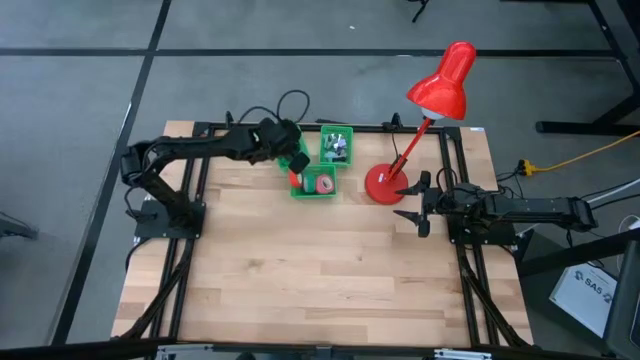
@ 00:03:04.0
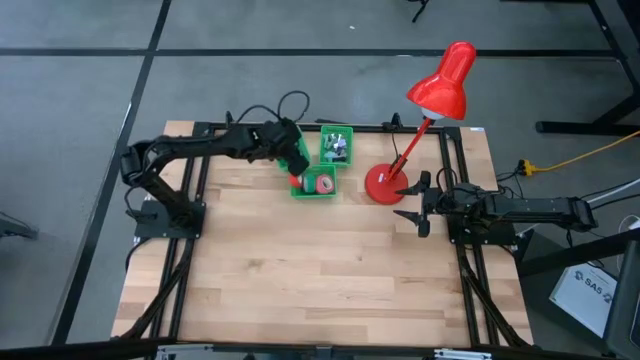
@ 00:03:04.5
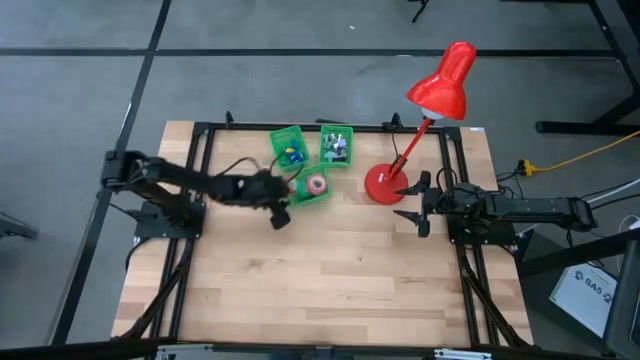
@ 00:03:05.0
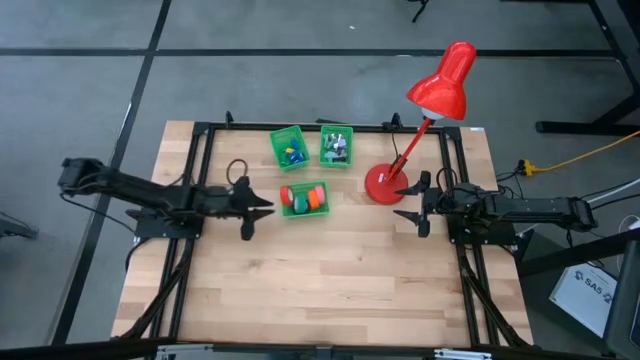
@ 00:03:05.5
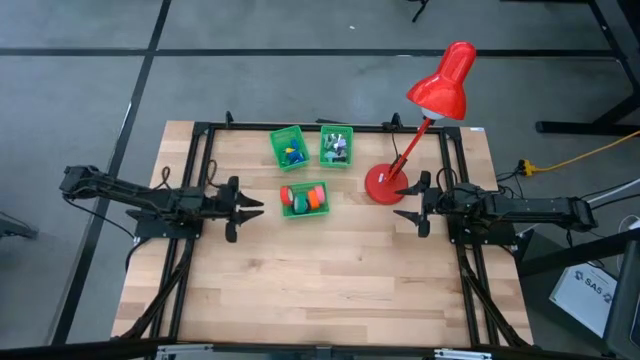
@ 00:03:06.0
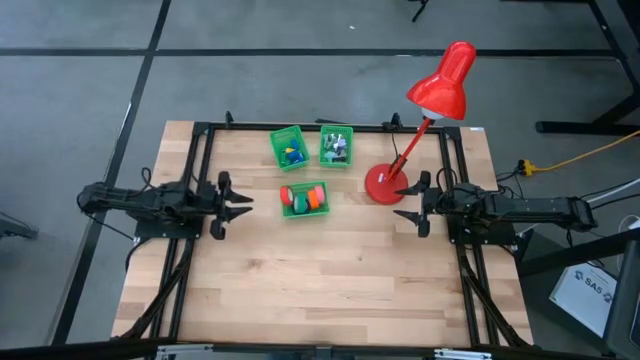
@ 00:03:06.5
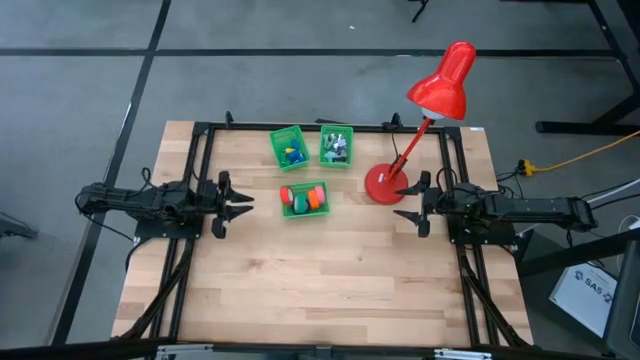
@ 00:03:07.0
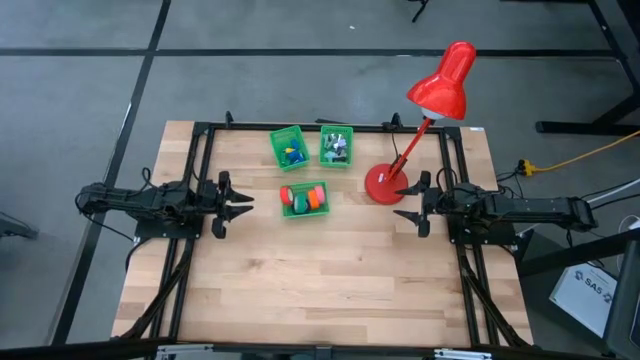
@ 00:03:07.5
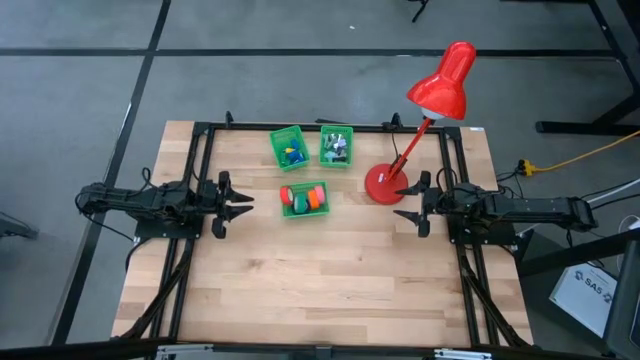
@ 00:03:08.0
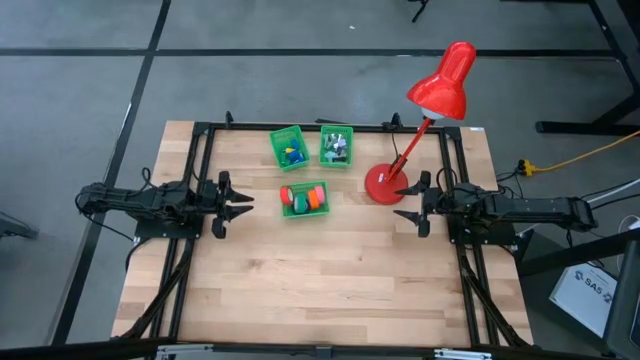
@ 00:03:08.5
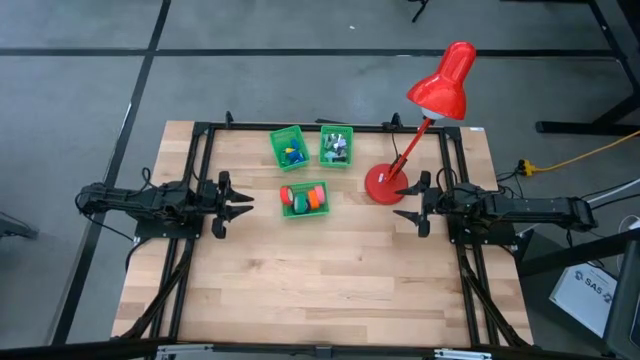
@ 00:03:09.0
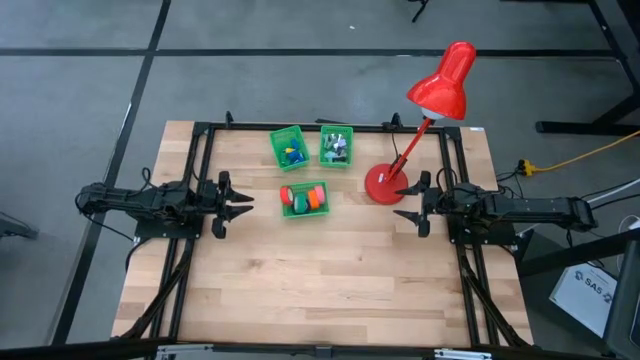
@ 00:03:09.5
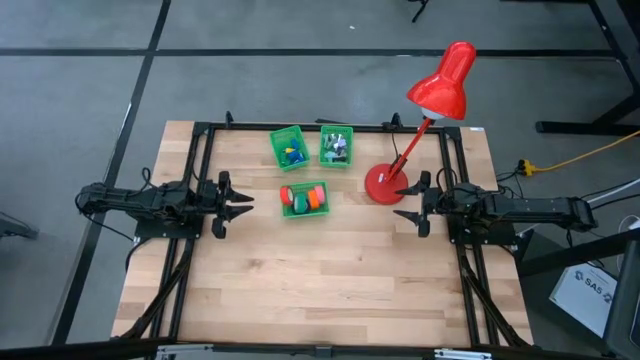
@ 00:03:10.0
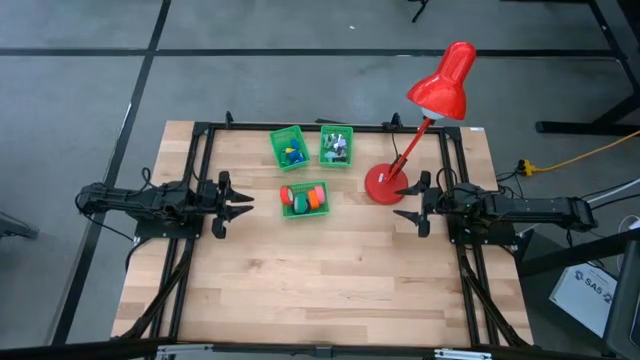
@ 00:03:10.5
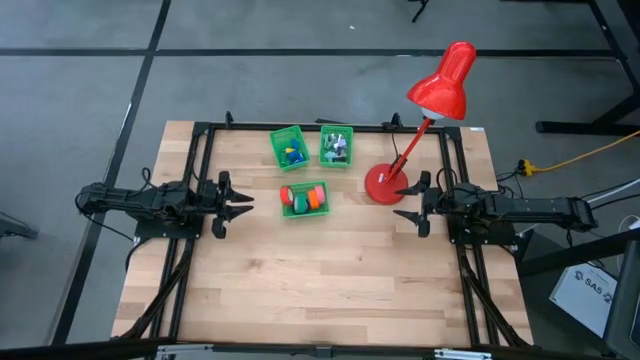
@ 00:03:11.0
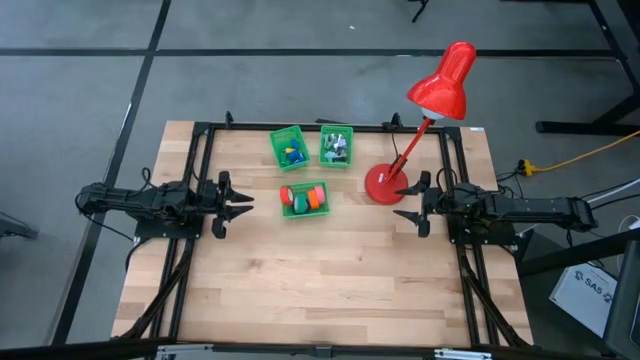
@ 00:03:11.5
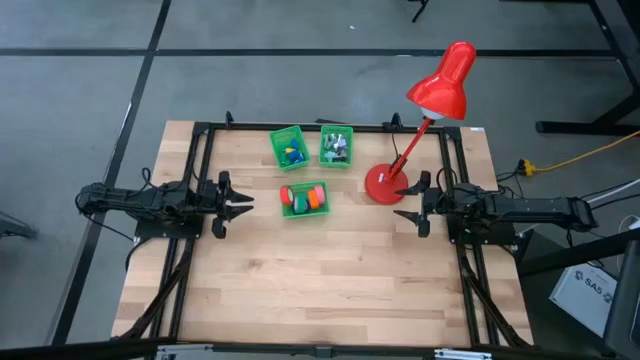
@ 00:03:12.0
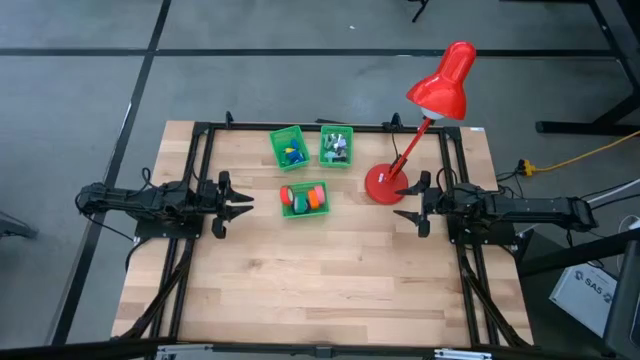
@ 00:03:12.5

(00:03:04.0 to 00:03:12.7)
Task: Pick and place Stapler, Stapler remover, tape
Return to Home Position

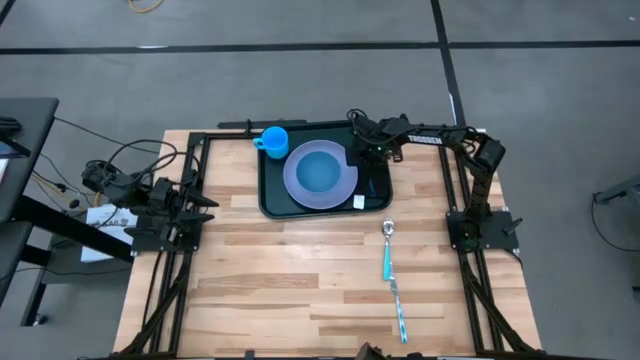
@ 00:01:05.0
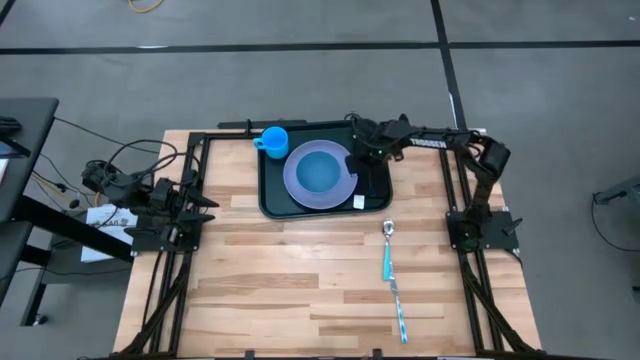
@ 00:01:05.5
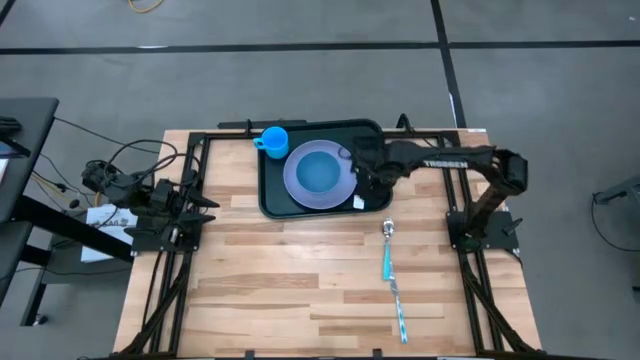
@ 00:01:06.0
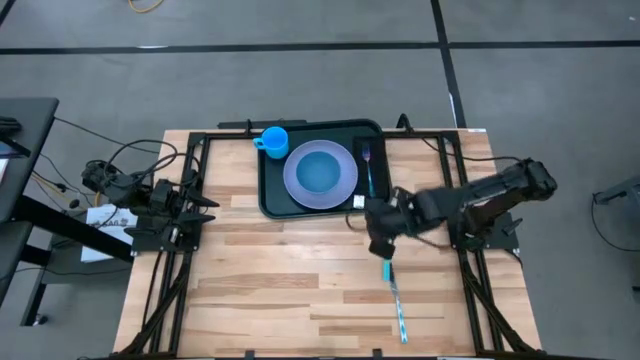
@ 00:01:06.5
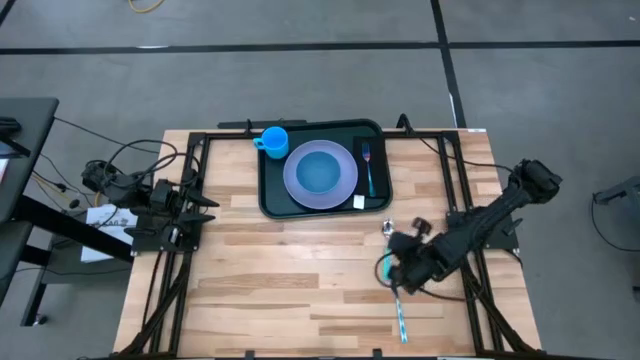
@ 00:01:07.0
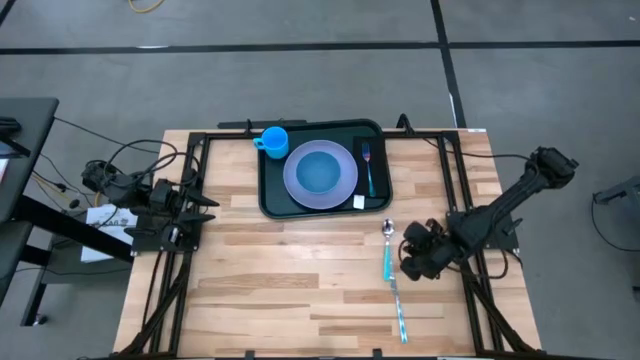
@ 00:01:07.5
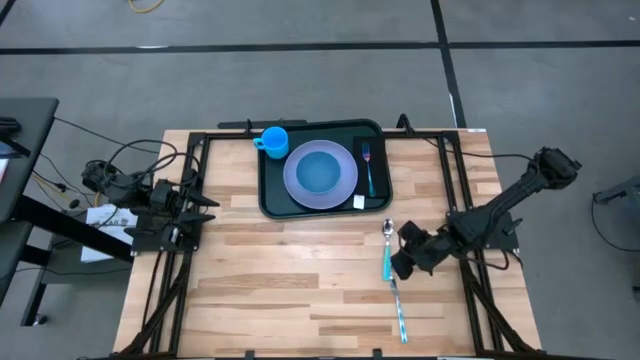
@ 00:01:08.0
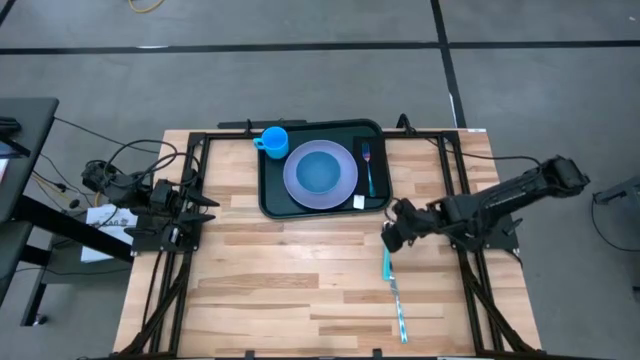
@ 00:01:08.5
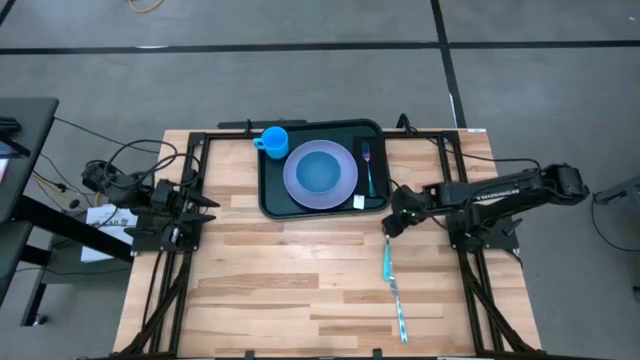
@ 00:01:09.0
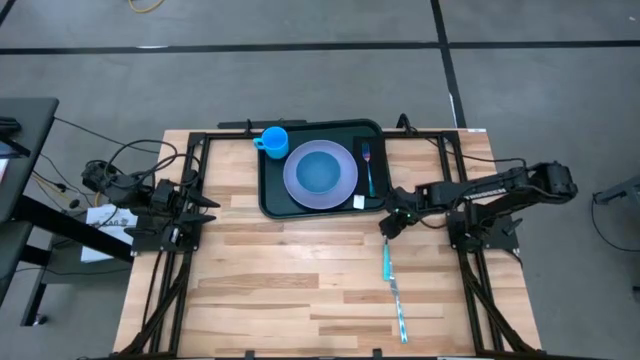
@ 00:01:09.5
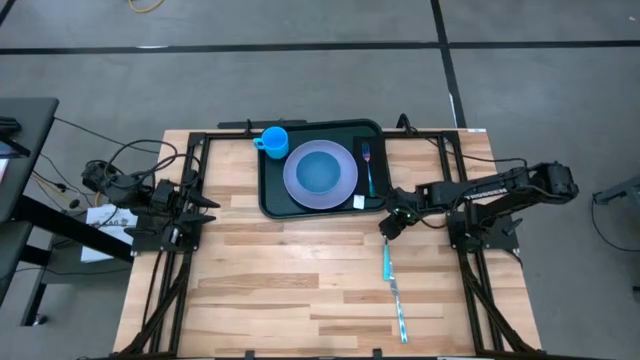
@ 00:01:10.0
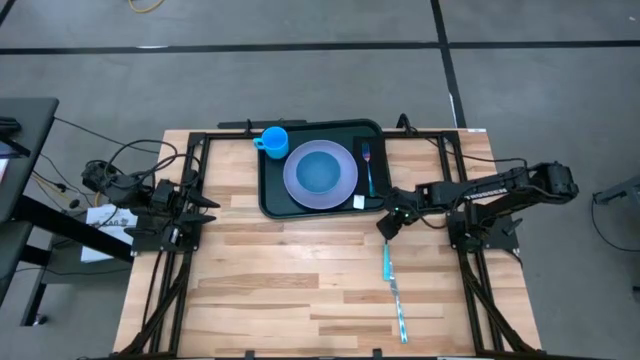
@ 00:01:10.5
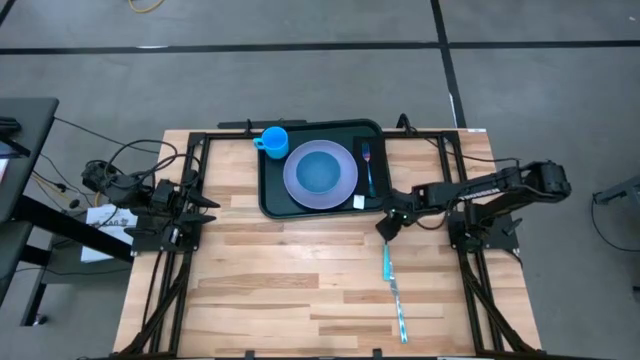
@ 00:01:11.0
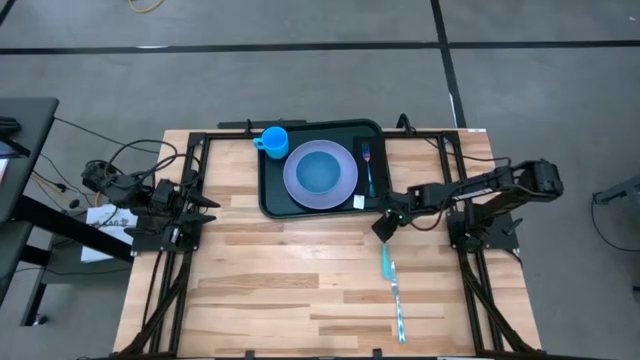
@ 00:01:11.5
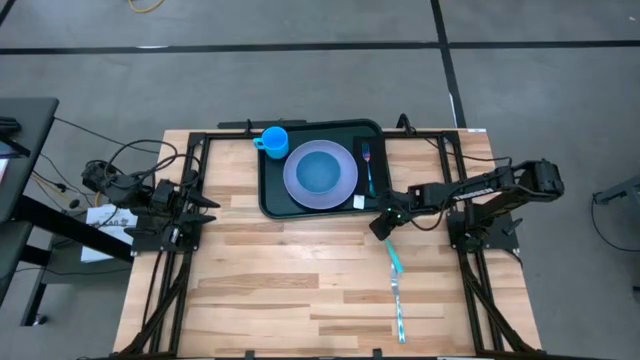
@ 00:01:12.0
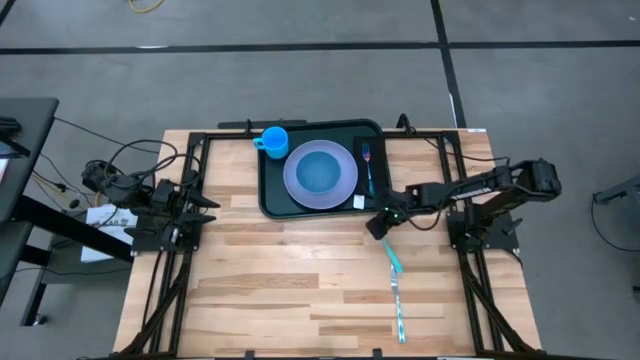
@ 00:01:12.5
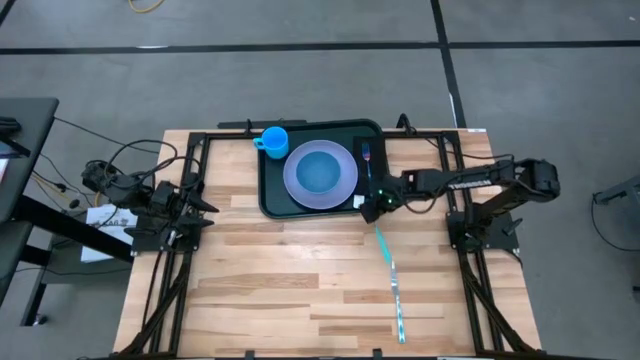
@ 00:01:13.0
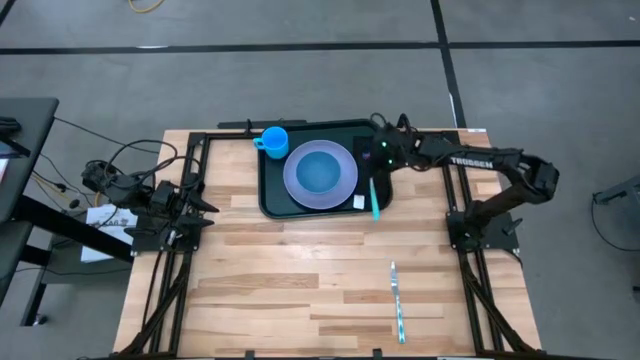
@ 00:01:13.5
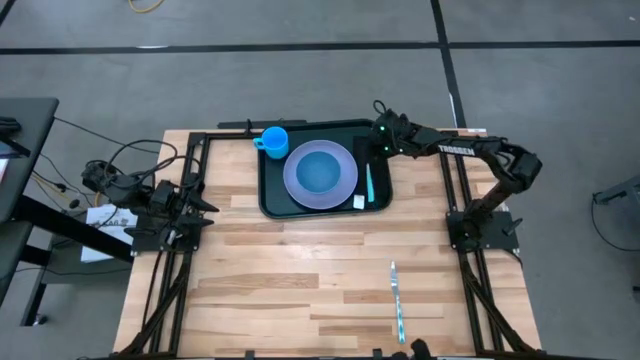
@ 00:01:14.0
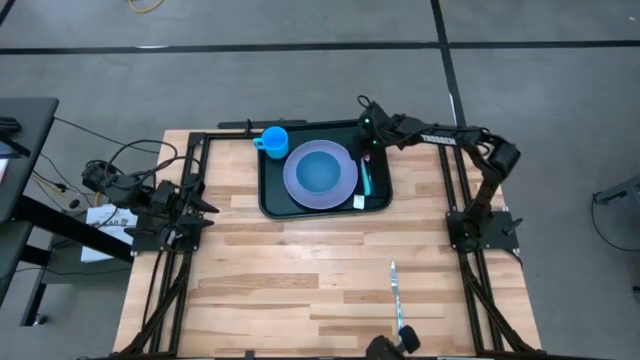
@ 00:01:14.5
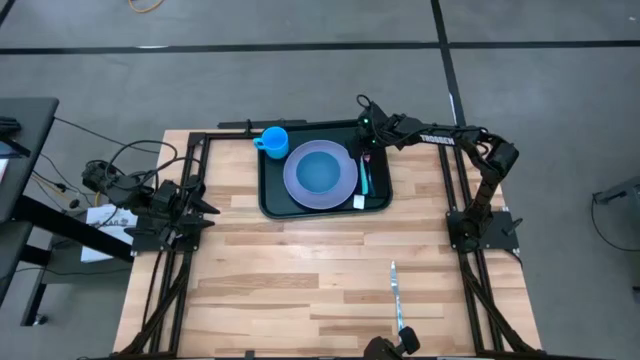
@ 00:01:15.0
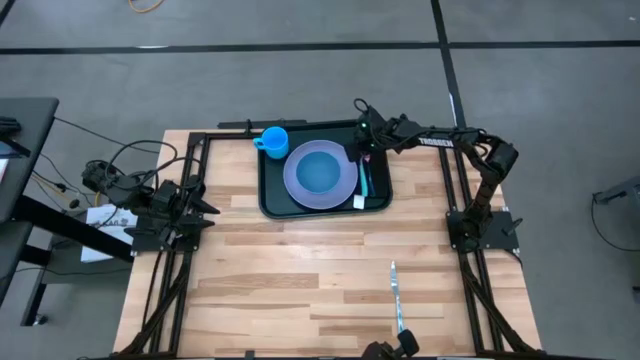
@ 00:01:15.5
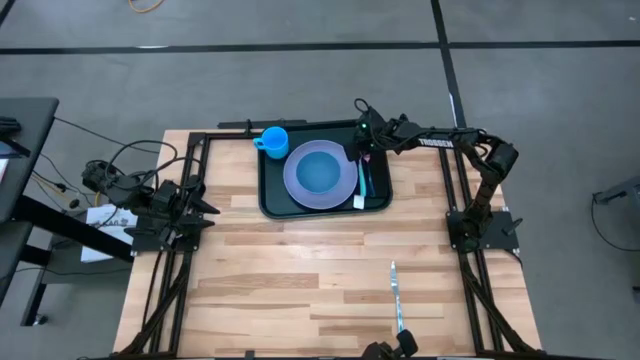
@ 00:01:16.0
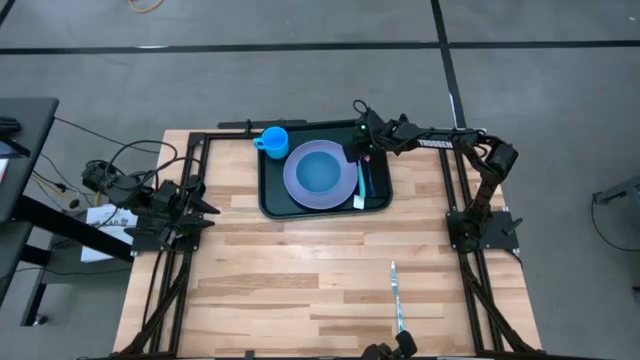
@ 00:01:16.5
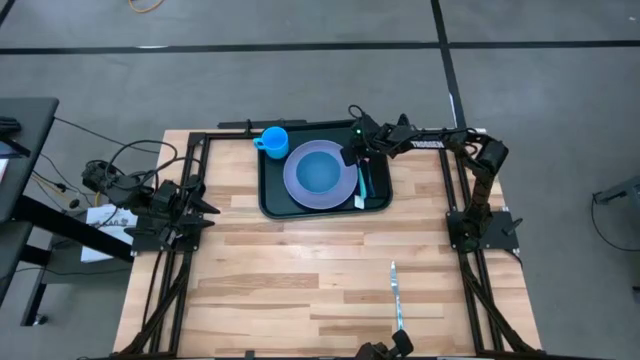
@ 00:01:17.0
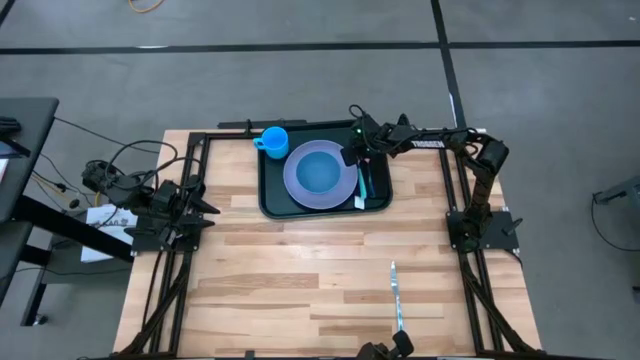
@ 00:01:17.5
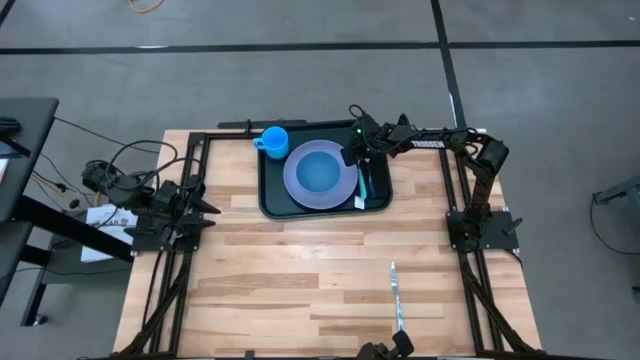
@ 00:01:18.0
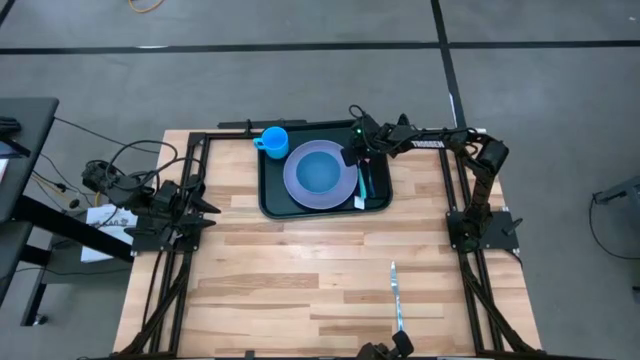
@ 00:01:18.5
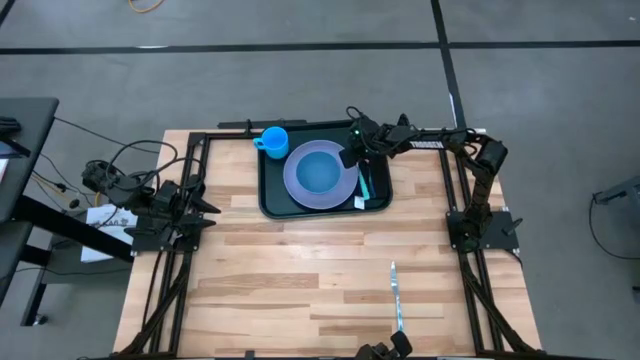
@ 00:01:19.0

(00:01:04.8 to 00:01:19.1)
Task: Set up tray
Put the blue spoon on the black napkin to the left of the blue fork
